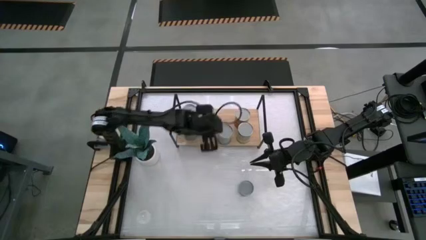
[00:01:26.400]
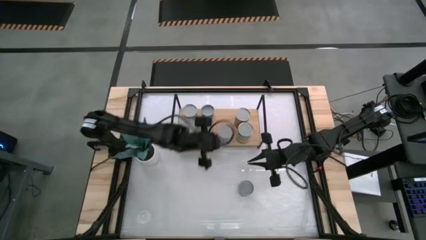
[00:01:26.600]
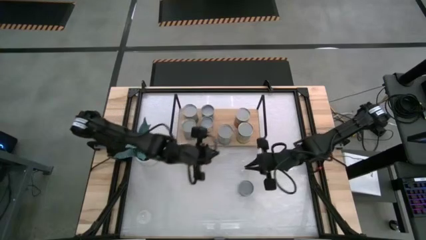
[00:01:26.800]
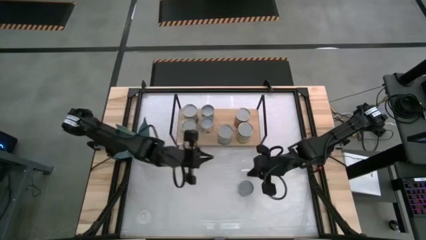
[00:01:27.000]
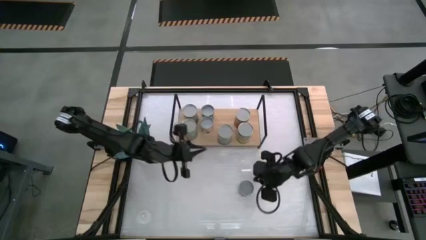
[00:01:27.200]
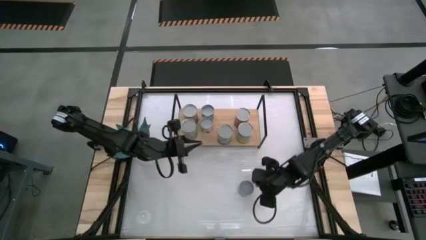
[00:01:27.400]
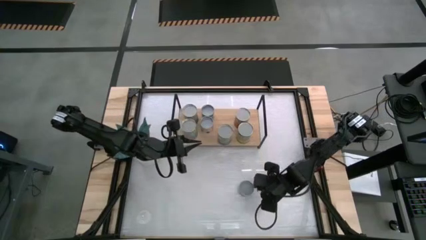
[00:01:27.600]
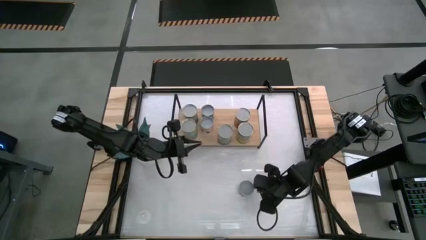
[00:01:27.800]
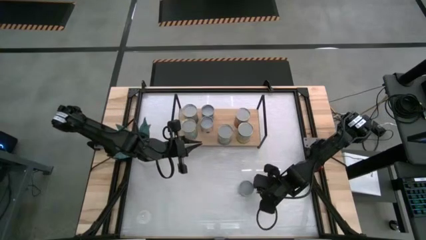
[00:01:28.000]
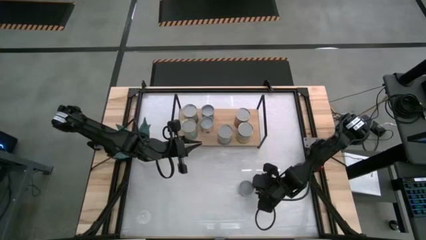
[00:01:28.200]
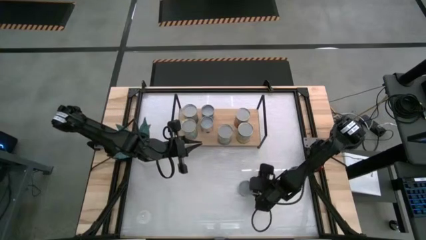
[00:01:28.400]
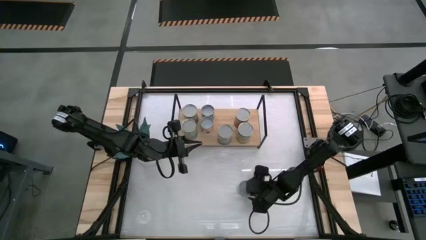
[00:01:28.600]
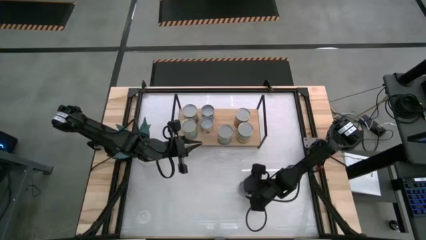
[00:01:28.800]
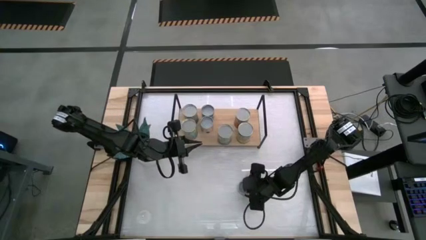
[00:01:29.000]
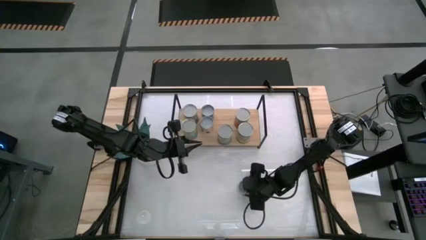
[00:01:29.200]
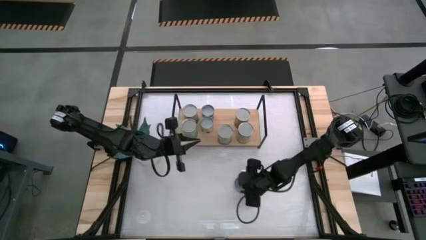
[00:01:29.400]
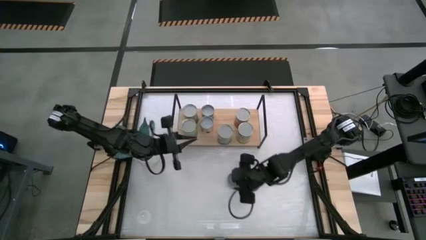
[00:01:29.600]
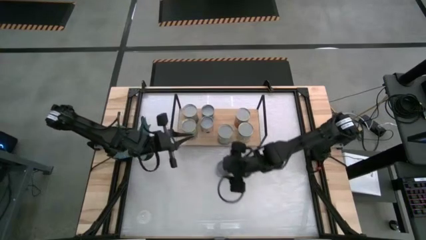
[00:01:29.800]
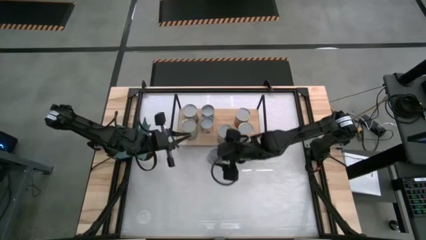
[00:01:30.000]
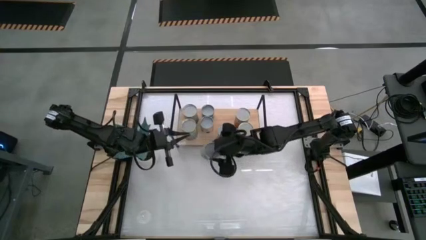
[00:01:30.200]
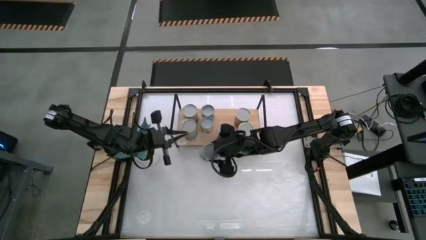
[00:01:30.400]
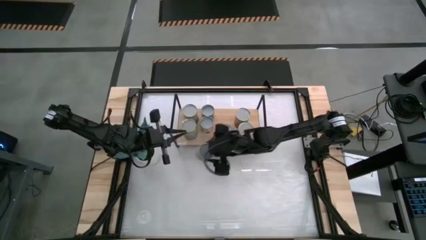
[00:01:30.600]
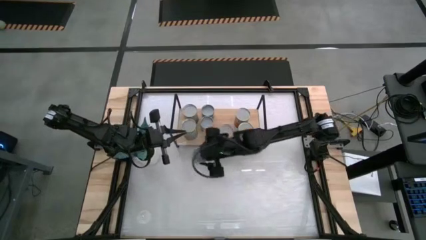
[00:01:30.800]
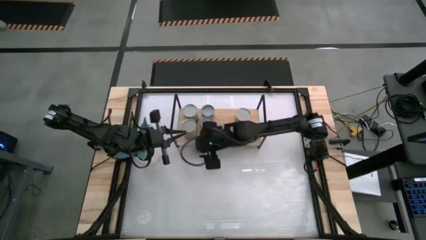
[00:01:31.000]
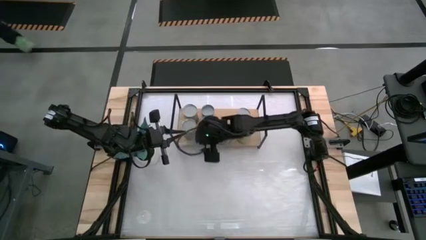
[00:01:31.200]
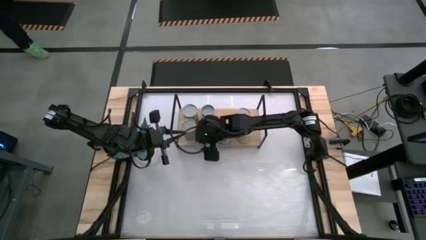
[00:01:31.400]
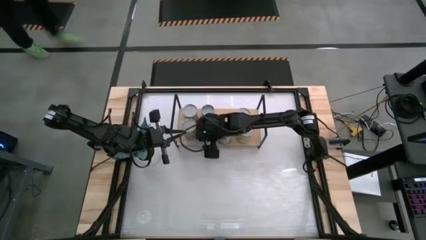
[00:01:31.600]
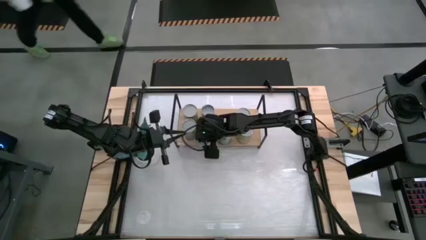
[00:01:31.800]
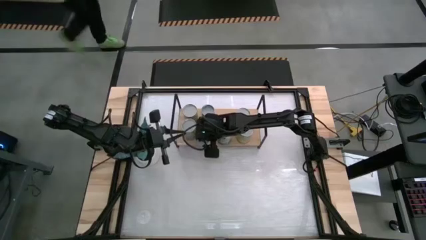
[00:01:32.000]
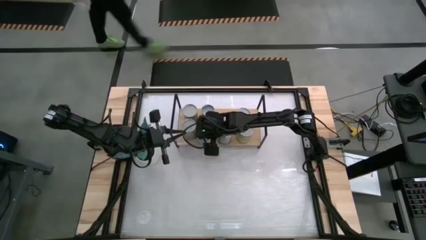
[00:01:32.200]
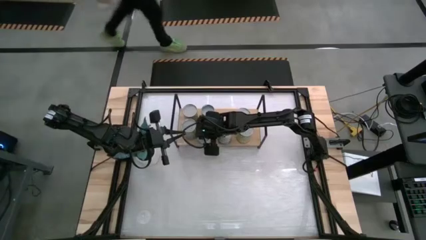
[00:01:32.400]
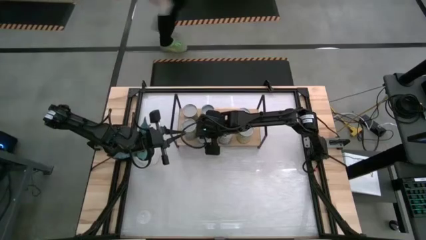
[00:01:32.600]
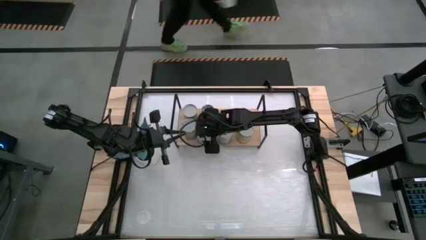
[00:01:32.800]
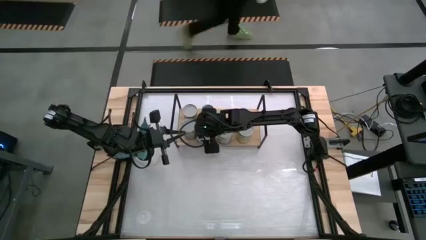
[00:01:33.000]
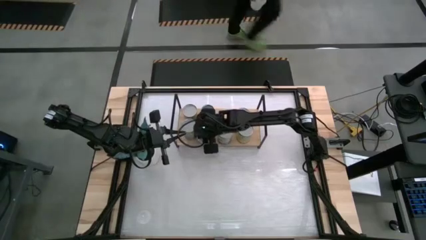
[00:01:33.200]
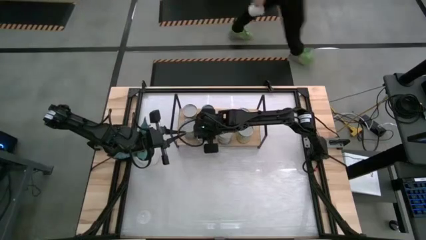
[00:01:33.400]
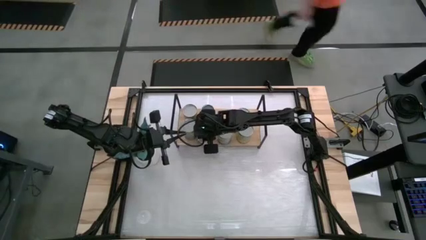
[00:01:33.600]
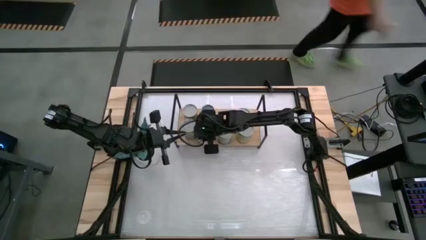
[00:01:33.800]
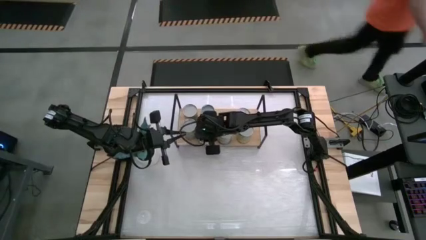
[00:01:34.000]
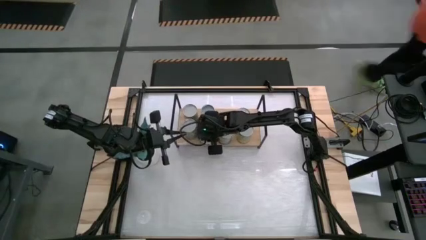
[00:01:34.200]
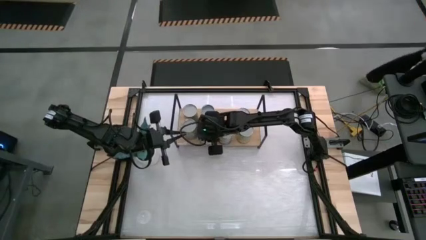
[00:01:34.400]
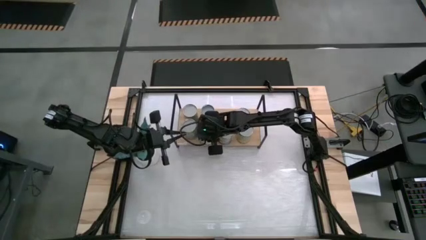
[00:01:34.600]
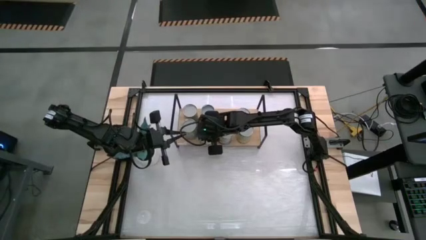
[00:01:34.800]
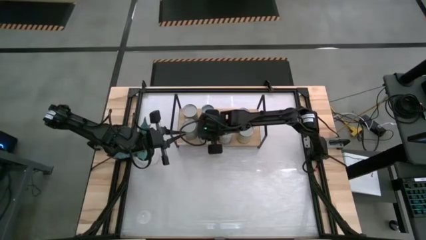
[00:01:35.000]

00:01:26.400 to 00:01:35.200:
Task: Pick and place cans onto a shelf
Put the small canned peas on the shelf

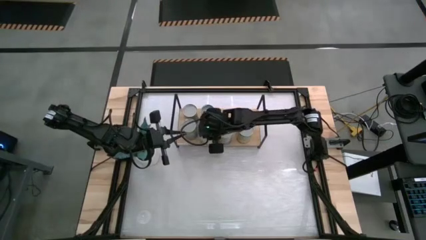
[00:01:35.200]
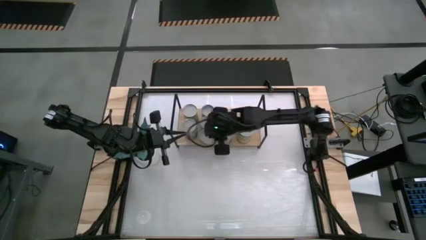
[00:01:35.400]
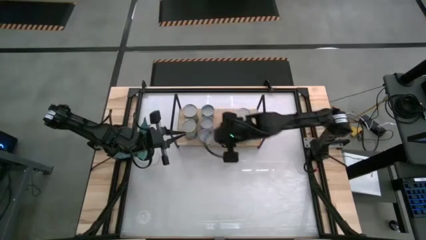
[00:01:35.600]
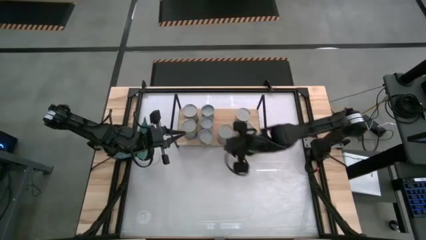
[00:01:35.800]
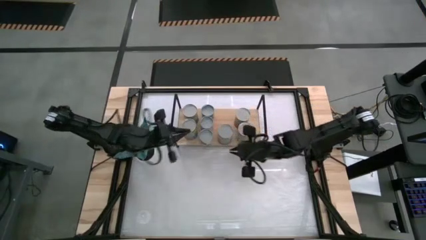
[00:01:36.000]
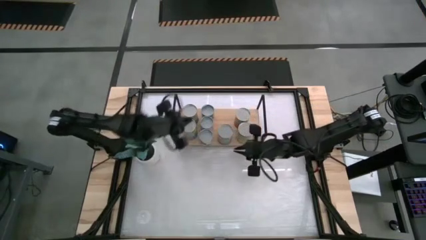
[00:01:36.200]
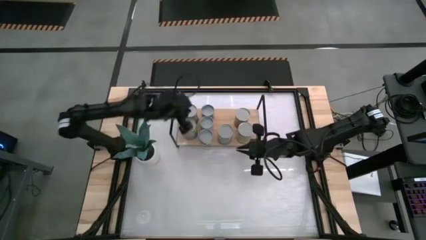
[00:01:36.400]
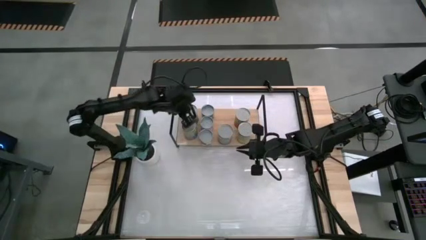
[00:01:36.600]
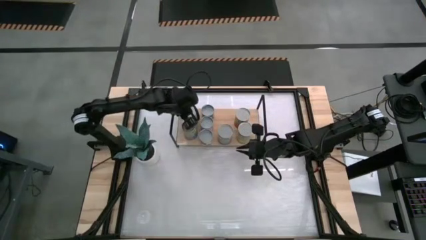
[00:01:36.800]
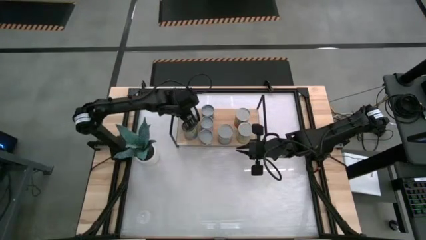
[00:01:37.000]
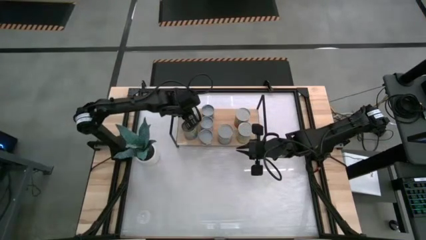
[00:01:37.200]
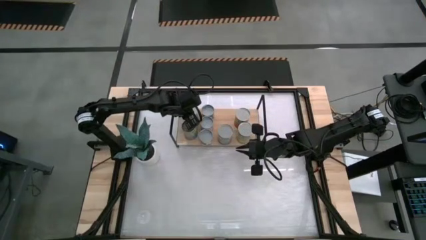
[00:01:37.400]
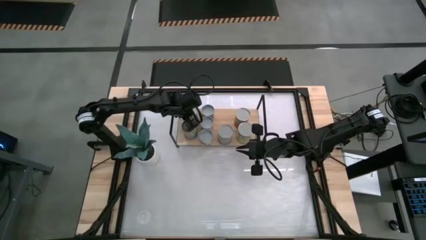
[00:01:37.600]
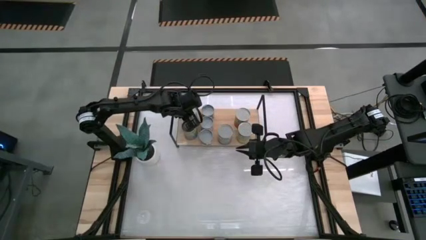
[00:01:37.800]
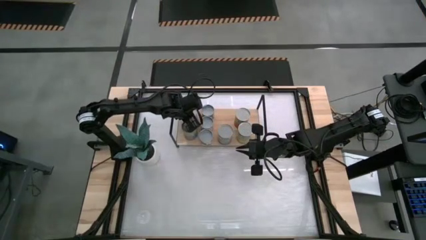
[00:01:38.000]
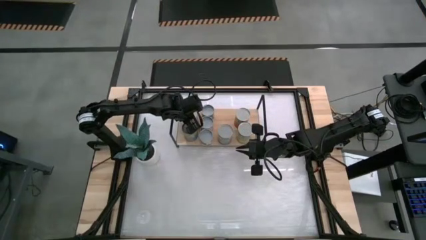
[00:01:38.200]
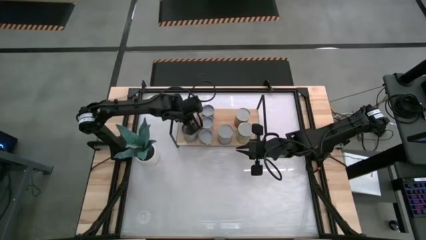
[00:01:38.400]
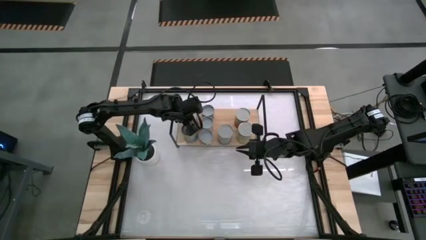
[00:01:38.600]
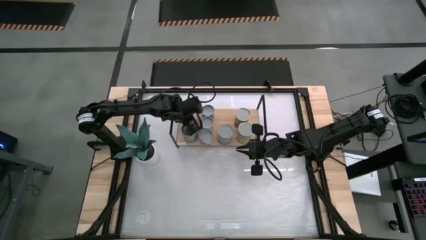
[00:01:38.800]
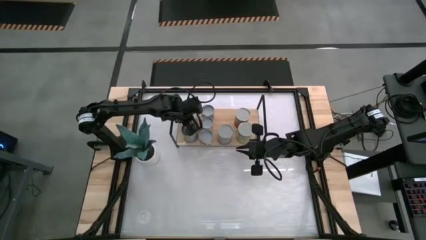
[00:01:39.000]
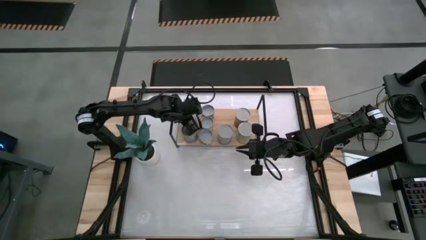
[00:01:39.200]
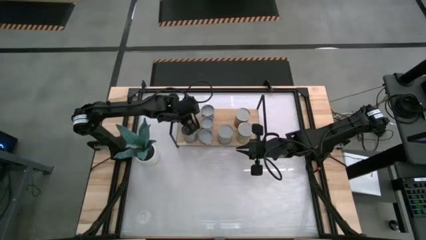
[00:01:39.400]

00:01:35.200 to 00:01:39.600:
Adjust the large canned peas on the shelf

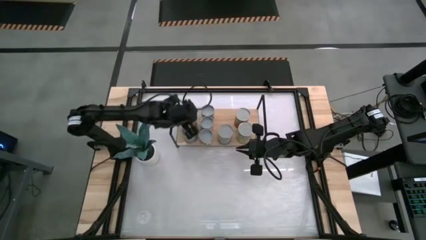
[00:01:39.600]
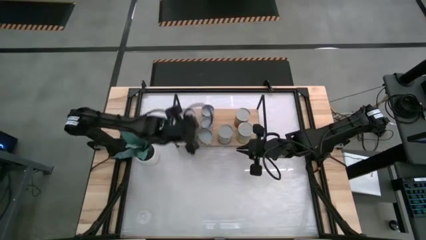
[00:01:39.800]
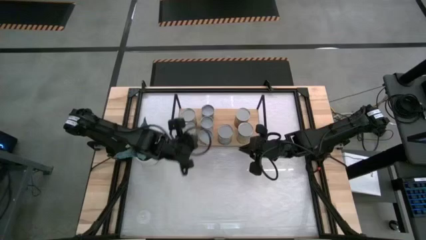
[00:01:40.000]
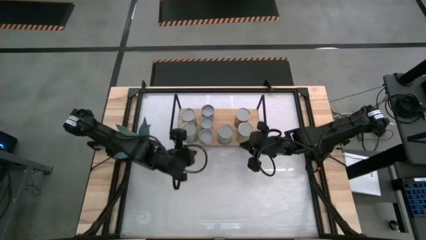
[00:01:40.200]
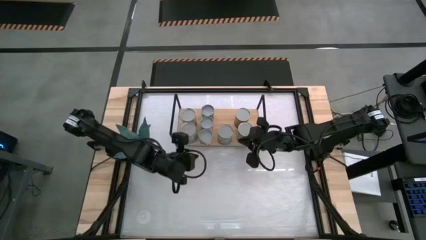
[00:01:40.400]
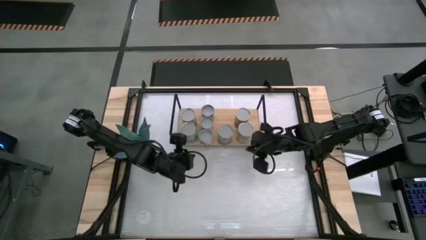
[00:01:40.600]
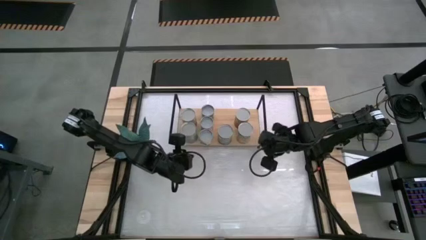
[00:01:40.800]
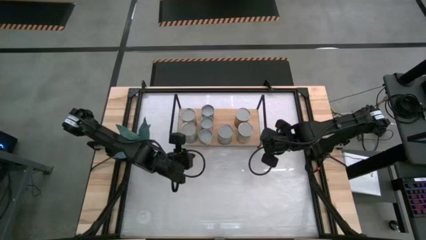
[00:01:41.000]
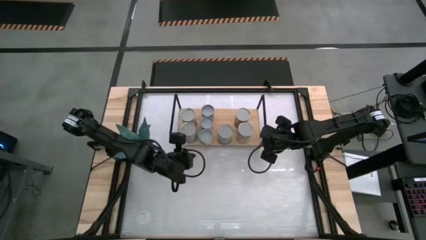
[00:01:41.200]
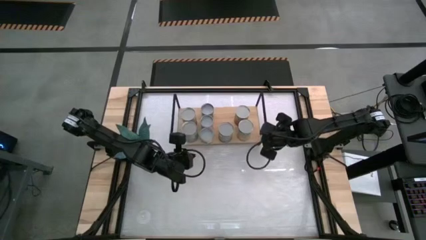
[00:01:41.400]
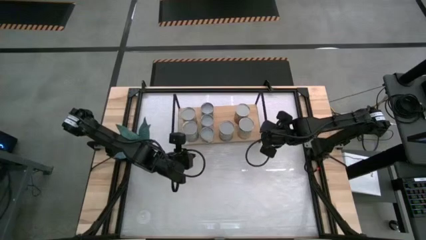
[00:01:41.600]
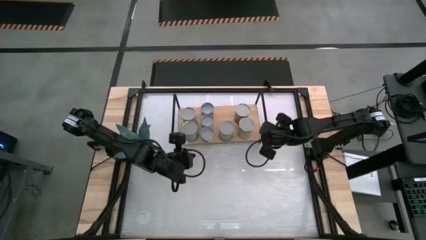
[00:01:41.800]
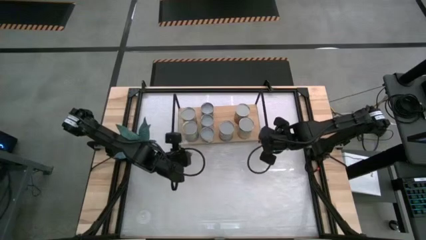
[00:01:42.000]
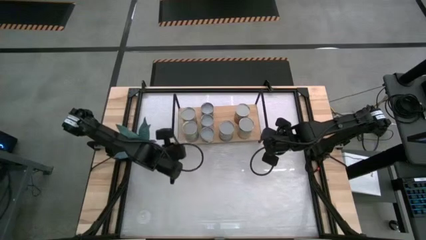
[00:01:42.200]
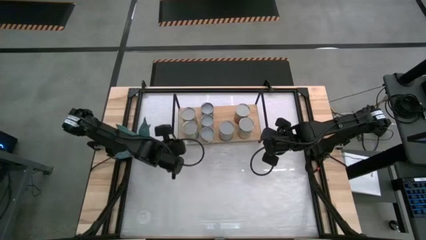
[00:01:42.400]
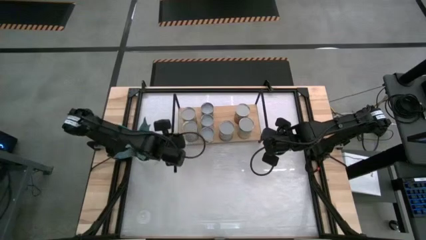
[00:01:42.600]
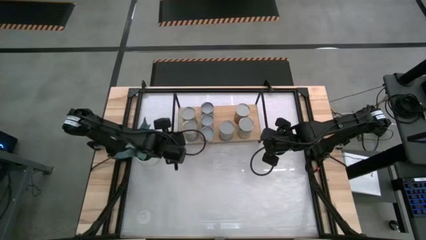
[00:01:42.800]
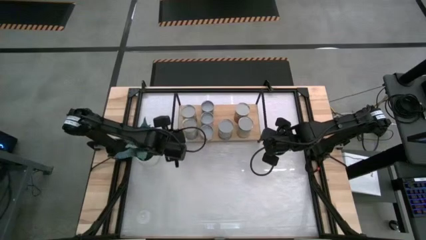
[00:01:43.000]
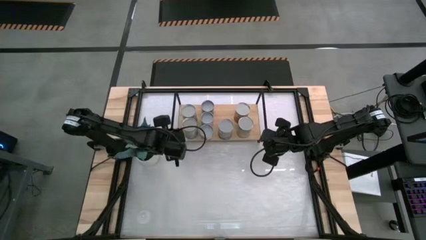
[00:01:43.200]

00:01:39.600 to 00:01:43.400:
Adjust the shelf
